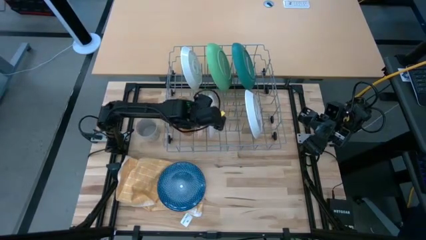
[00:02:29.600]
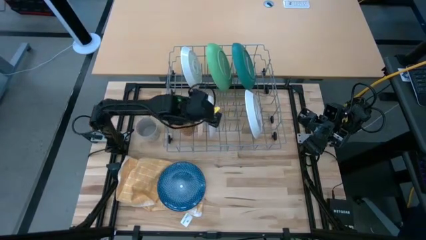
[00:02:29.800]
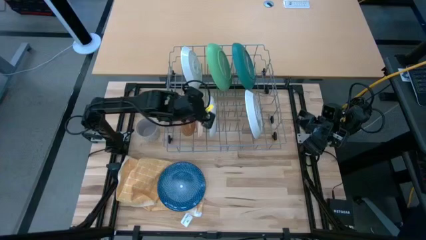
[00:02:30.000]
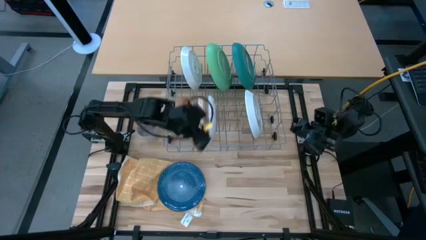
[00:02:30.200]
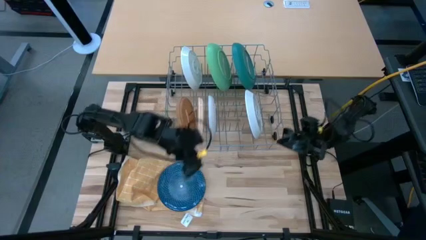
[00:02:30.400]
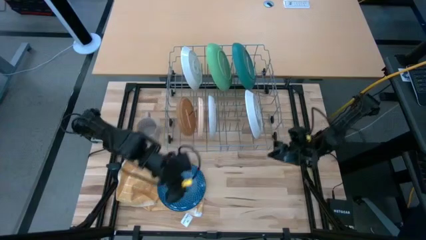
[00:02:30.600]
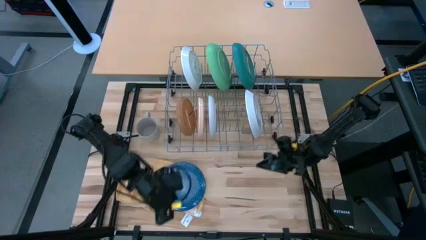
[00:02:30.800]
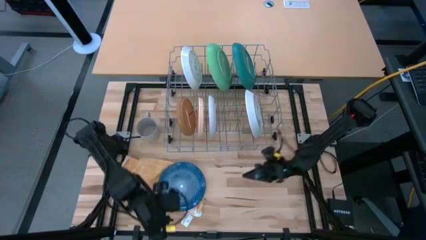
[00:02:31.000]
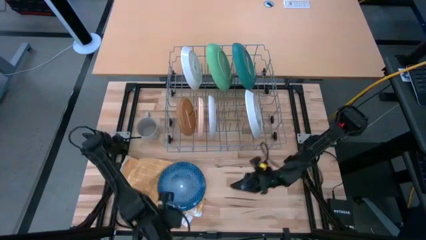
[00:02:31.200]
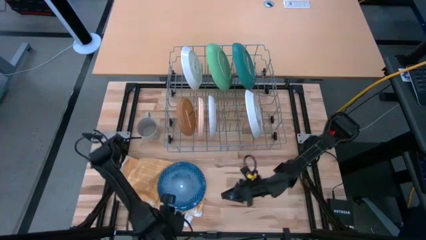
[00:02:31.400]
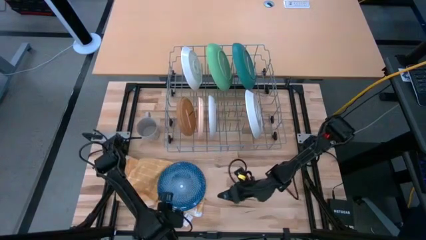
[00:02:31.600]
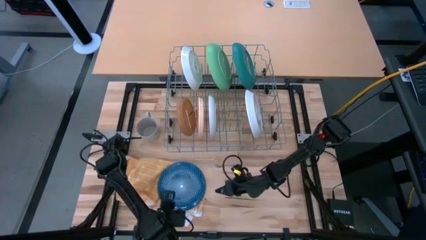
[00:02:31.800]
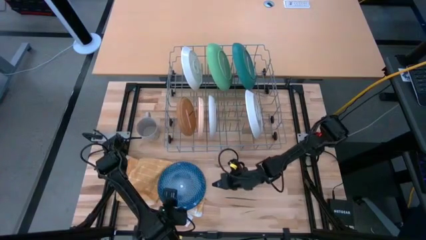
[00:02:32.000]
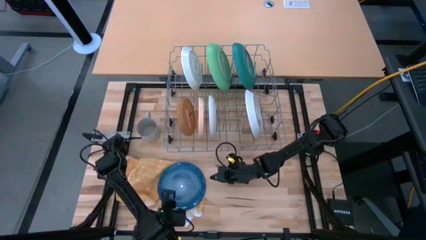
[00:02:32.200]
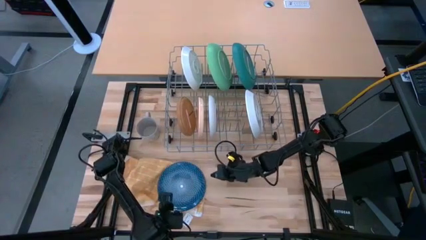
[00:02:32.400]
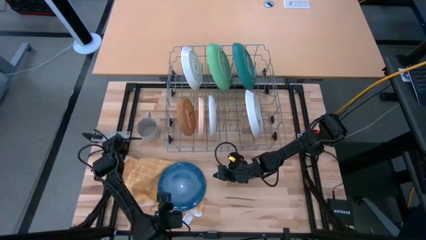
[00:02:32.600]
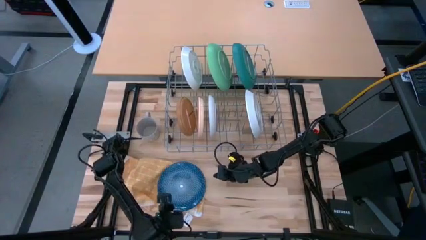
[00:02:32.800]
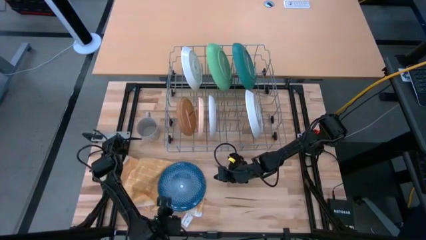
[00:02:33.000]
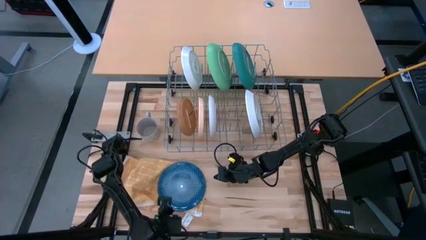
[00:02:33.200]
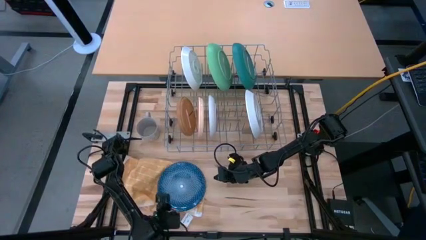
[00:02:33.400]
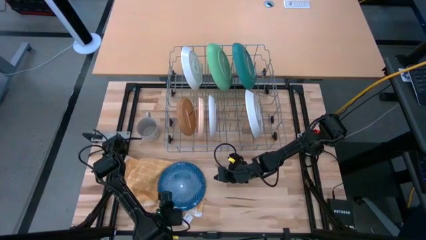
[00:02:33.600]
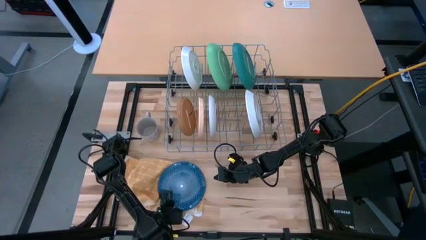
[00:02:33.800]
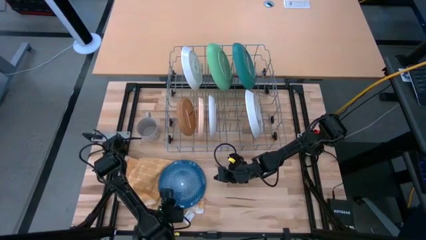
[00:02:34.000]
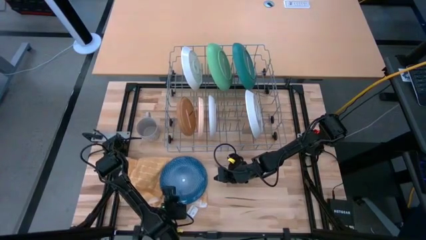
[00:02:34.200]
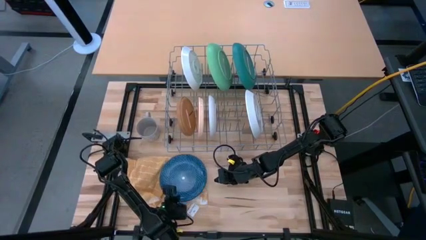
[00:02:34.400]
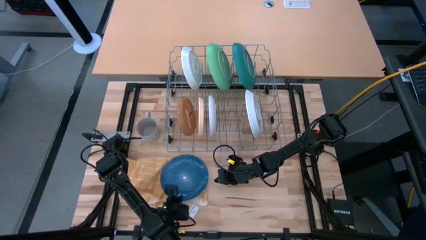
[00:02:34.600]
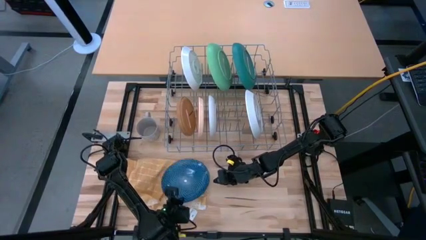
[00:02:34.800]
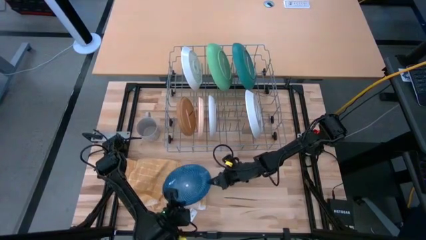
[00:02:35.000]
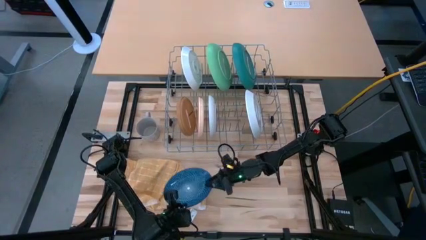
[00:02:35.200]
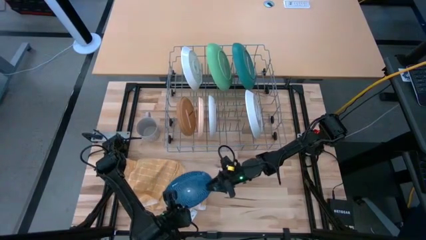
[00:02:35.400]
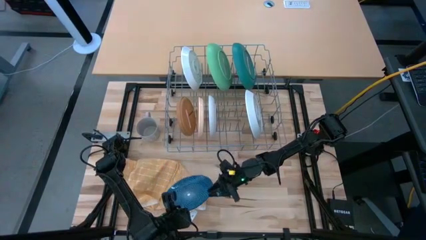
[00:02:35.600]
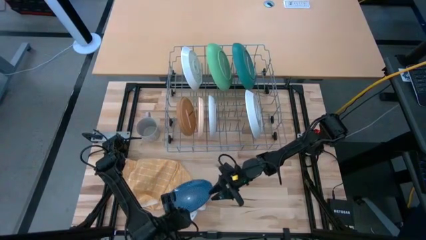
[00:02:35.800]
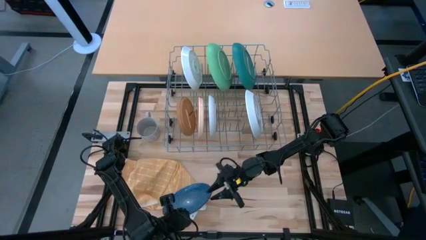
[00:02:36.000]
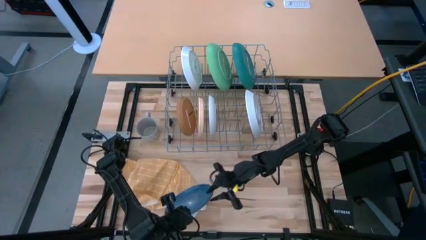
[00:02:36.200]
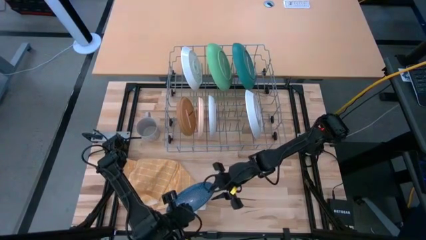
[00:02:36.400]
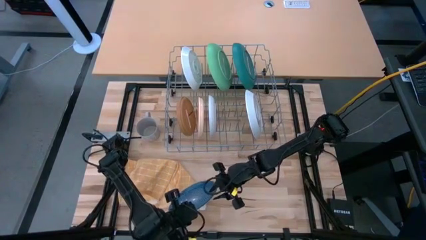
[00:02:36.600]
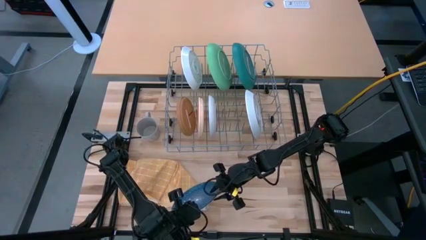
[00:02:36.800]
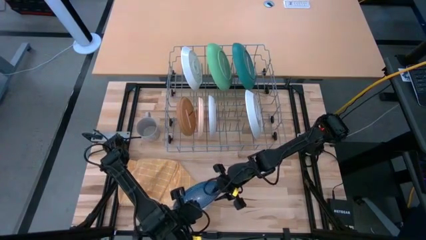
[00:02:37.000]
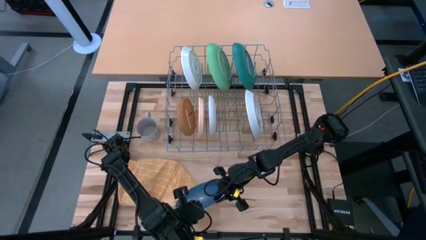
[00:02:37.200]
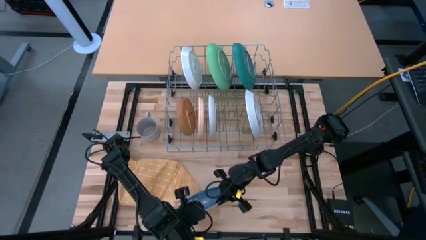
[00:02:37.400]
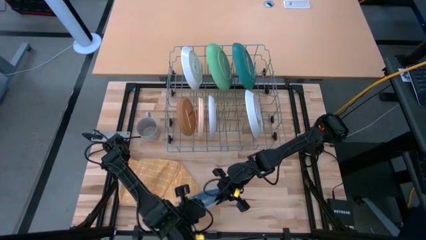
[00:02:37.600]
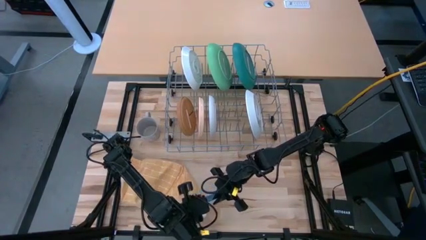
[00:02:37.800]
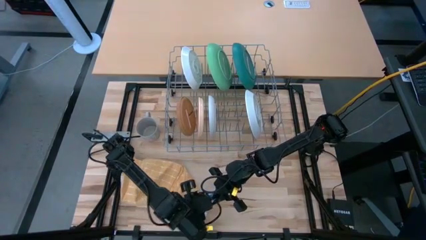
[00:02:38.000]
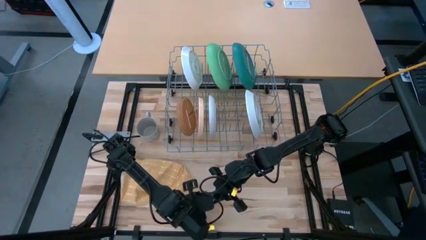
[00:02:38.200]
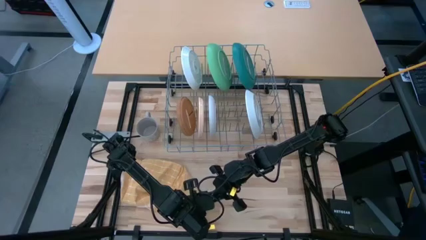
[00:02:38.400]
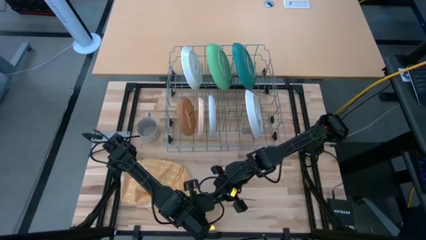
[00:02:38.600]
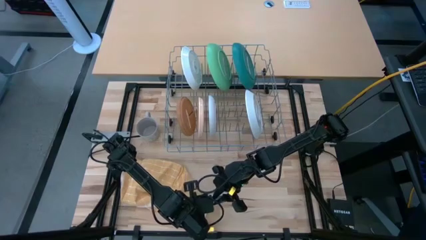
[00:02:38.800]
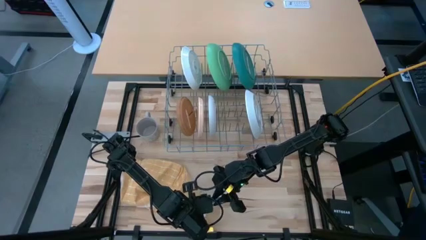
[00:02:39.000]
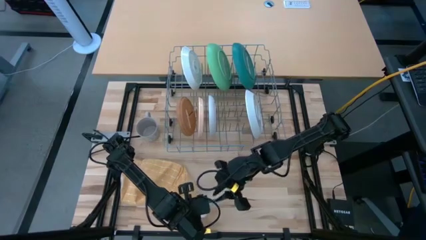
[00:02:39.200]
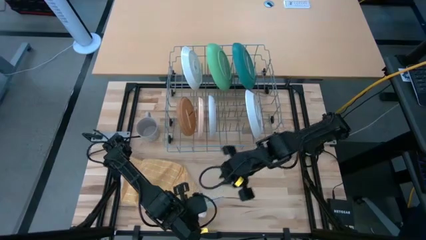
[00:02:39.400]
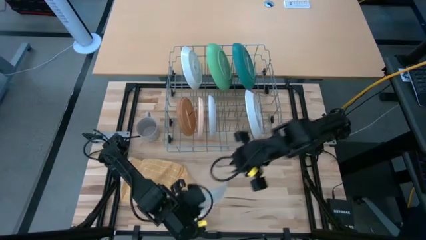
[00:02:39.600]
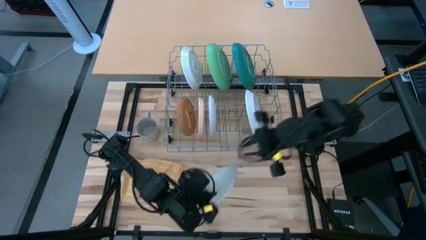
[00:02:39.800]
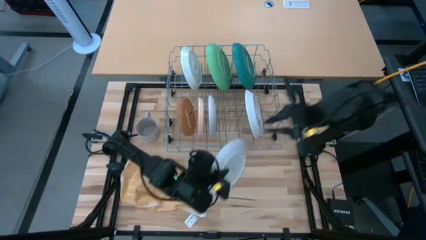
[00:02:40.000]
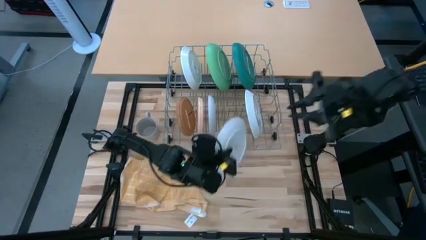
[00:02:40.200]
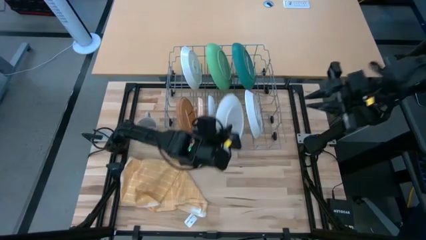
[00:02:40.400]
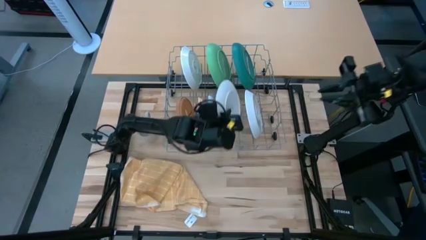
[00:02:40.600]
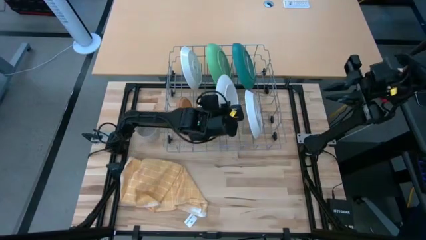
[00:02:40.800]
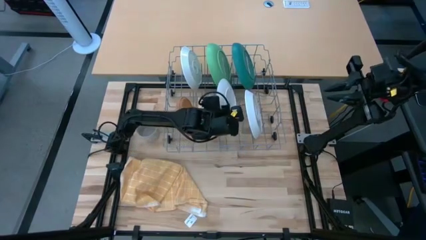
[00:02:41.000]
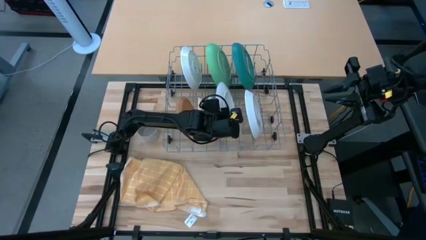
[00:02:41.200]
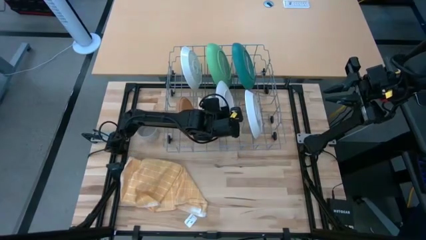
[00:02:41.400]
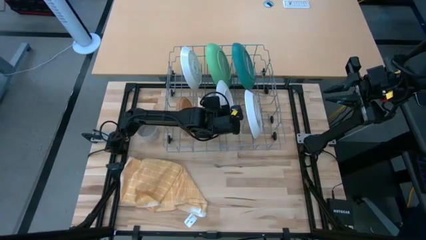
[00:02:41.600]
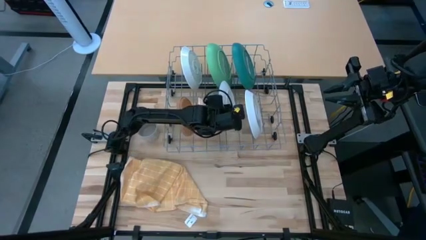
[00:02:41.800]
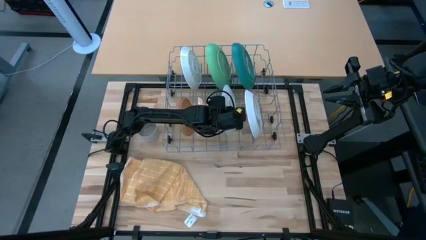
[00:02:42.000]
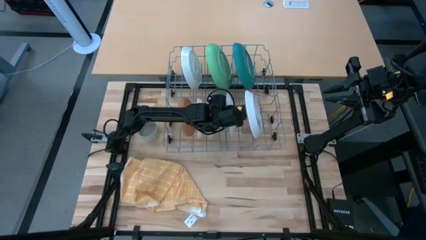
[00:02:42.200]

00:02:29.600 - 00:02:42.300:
Task: Sort dishes
Put the blue patterned plate in the dish rack

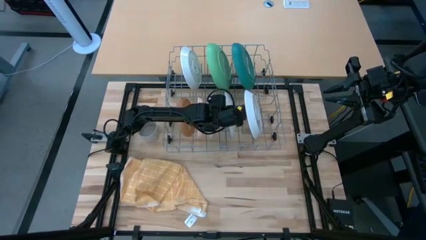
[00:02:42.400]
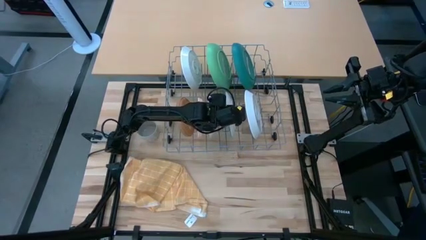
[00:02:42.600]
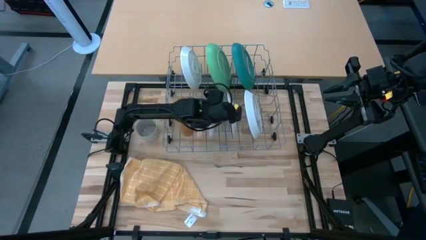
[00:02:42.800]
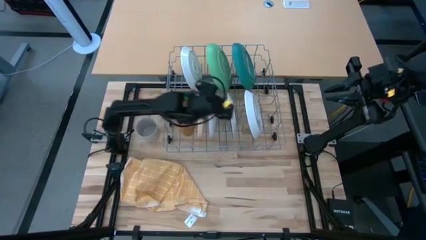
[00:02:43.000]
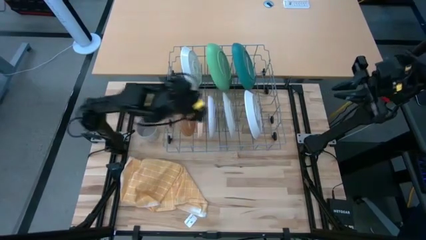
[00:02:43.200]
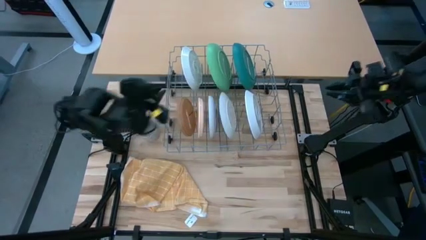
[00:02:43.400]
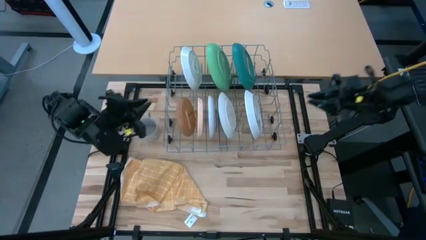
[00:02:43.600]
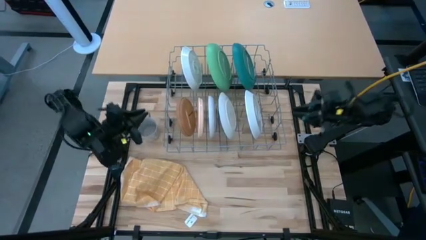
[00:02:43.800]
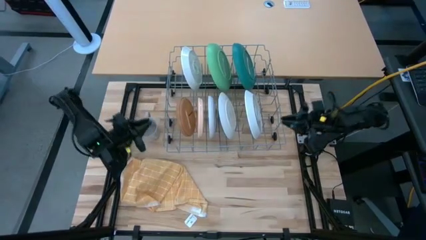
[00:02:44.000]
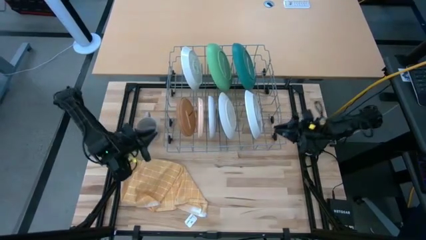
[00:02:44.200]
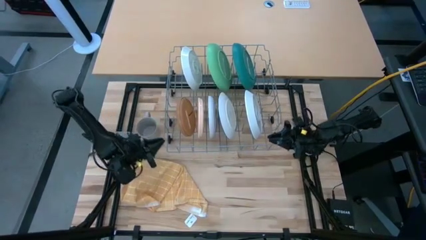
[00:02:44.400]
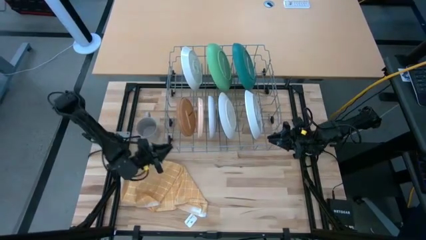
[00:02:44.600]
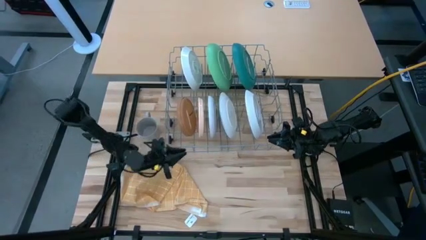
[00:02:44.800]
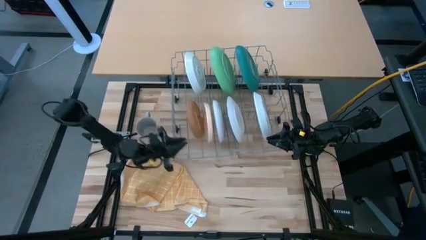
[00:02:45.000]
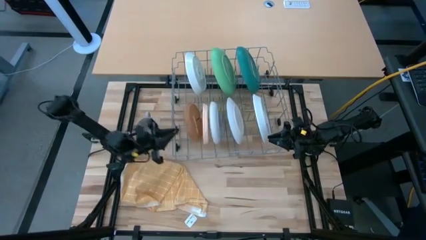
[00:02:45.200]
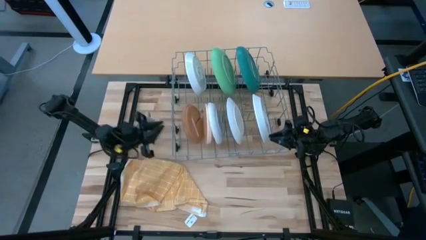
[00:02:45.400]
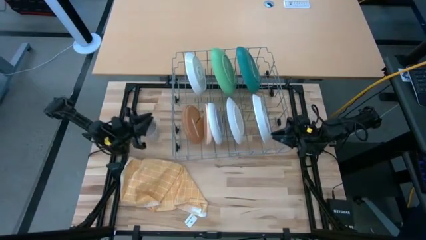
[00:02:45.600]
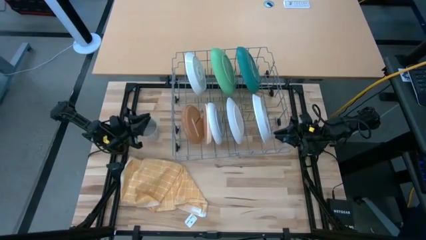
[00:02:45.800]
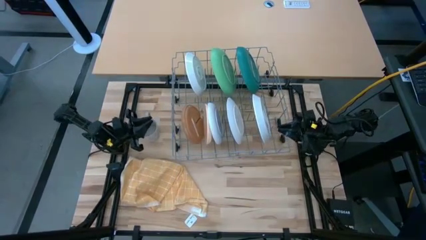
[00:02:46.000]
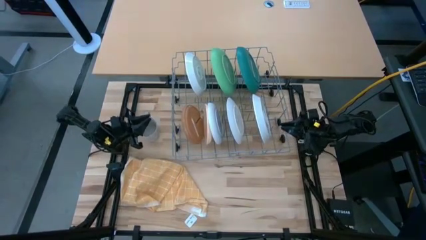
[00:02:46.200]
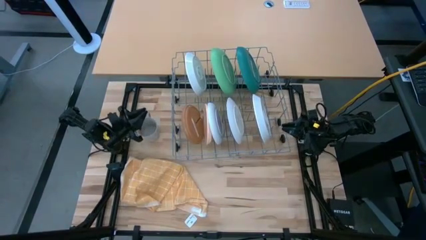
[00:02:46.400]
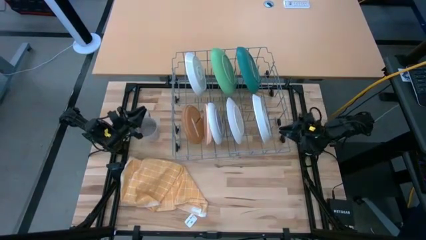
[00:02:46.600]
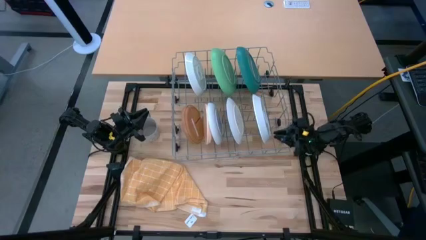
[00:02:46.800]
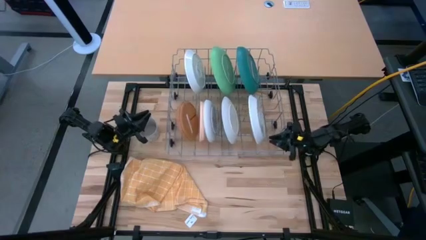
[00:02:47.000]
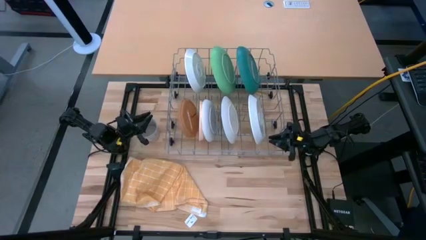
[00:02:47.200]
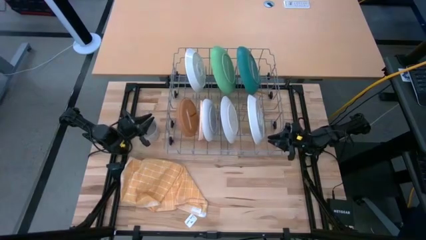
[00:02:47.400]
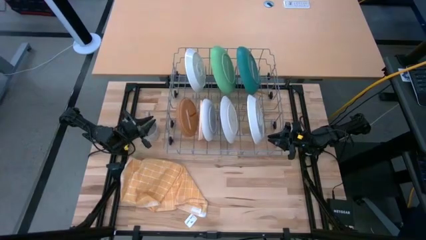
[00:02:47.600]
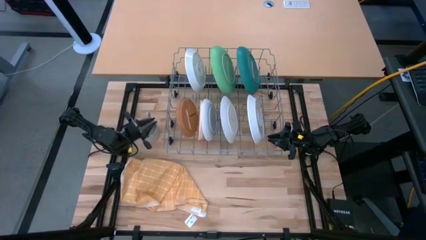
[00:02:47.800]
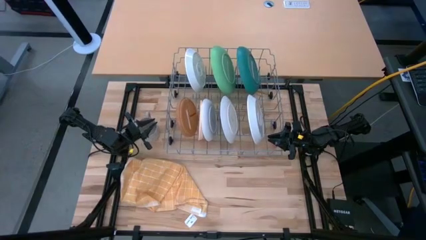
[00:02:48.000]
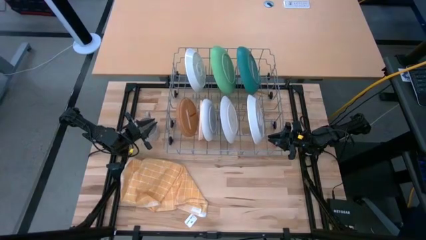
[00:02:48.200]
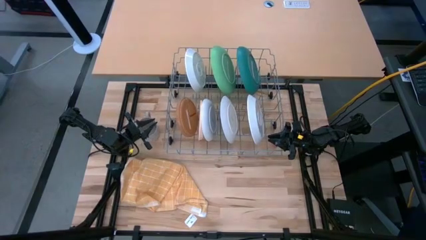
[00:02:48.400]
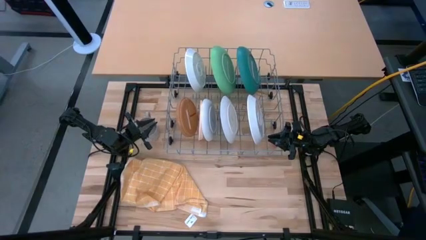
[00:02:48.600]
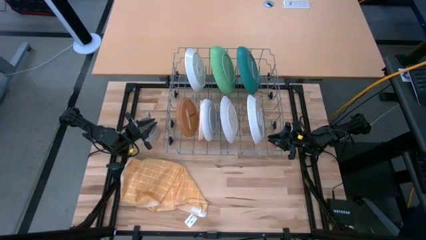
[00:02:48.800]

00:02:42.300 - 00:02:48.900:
Return to Home Position
